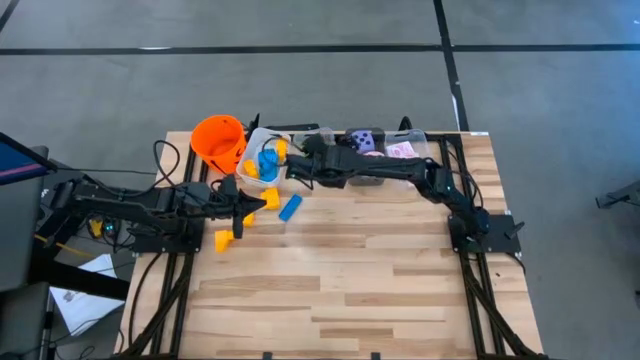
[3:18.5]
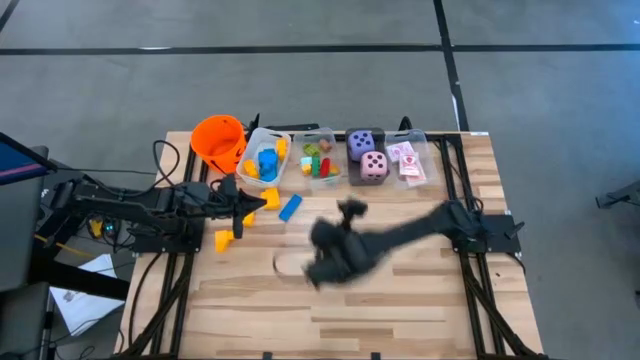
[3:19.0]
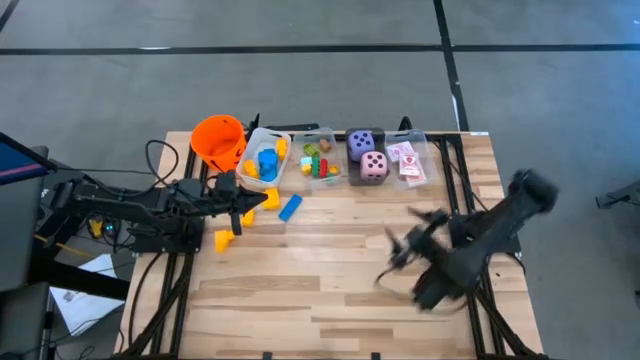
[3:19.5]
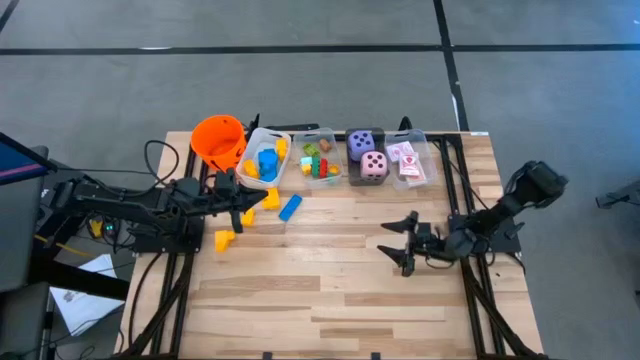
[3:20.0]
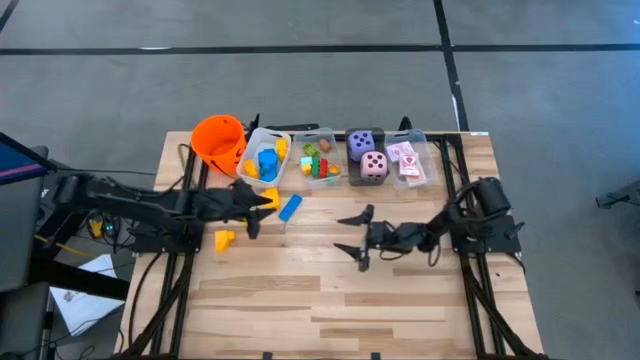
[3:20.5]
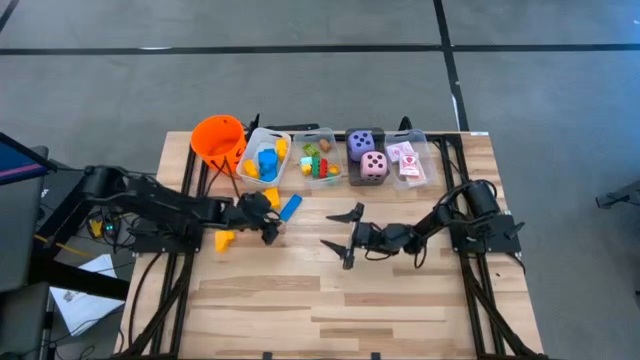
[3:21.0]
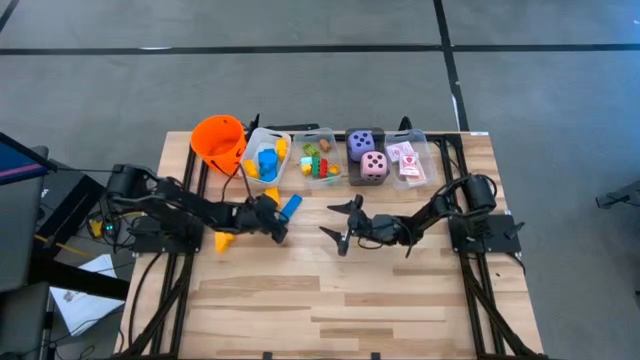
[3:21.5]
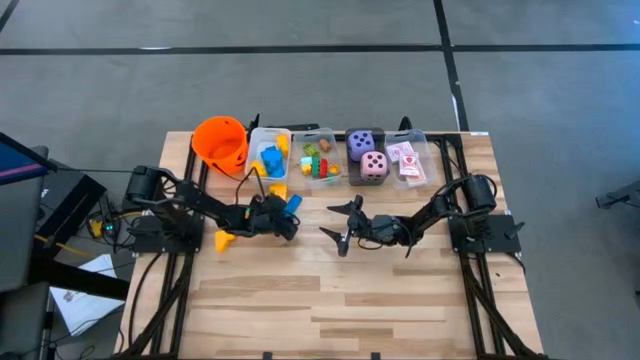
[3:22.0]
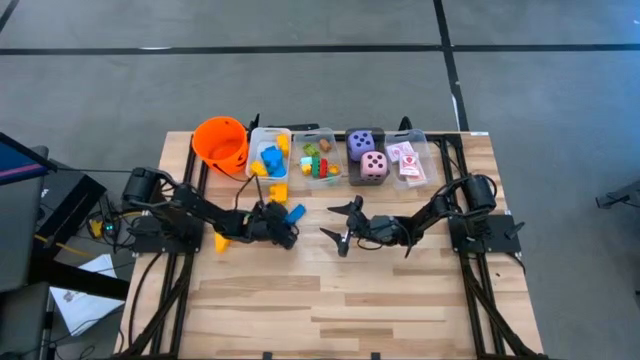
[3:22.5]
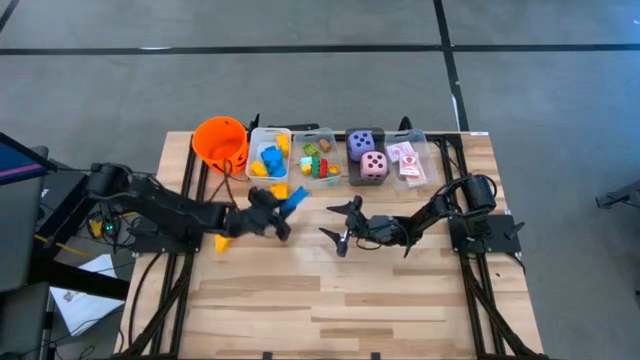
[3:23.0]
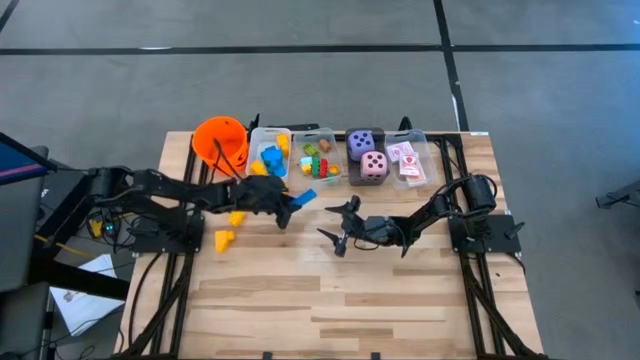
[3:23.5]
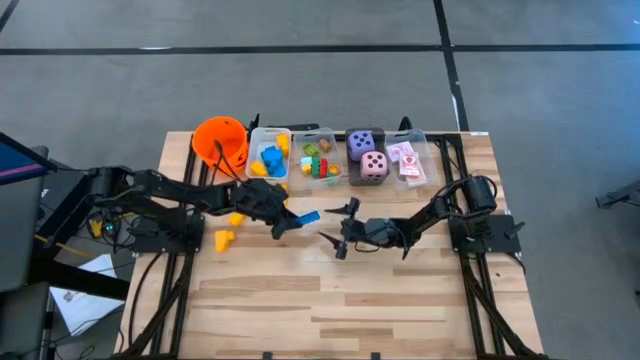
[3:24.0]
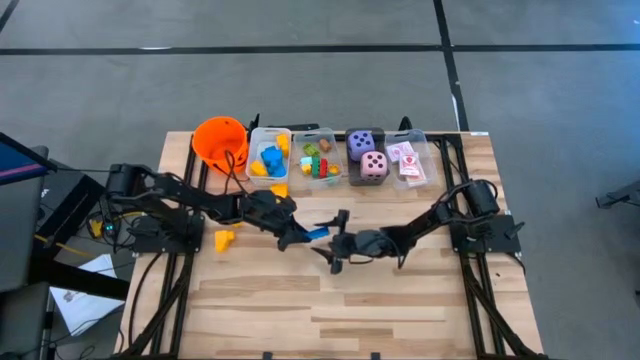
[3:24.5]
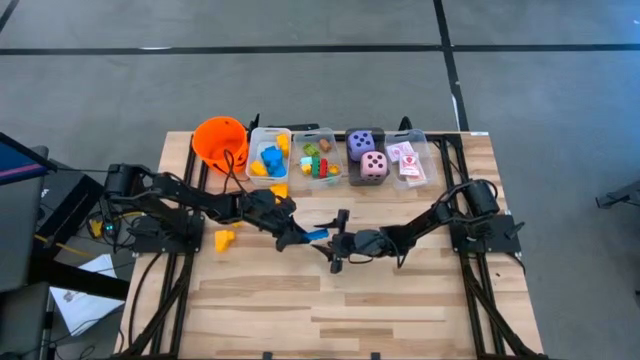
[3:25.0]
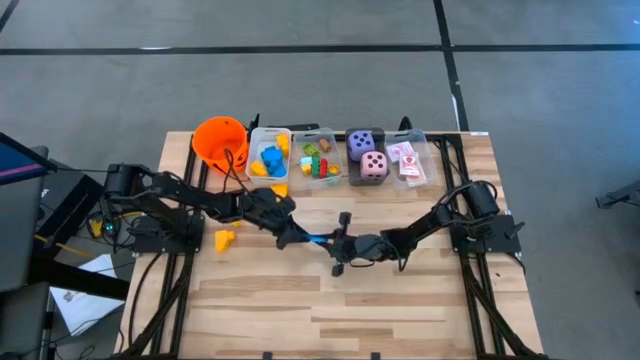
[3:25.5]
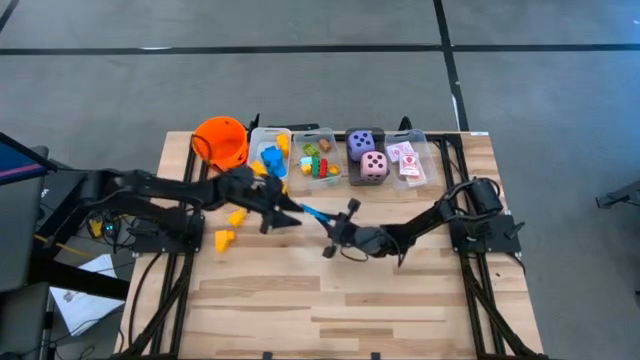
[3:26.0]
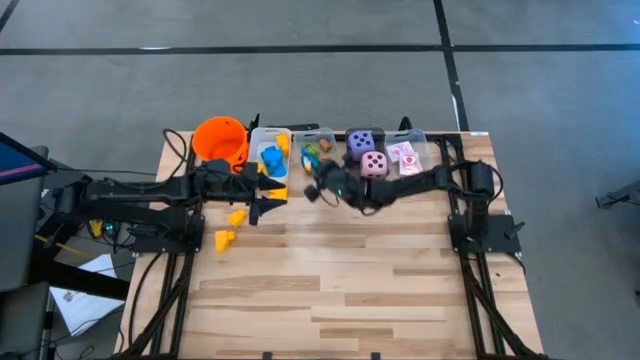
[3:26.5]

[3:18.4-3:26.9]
Task: Pick & Place Toys
Put the small blue game piece into the left transparent bin

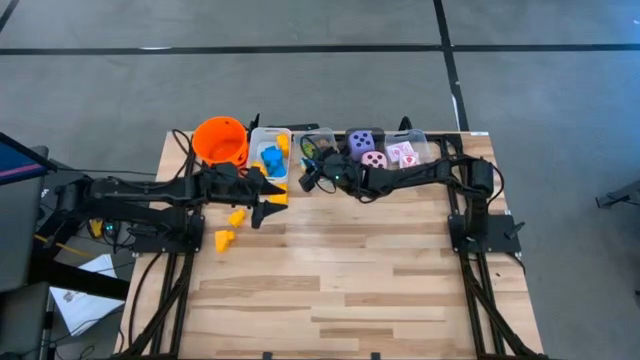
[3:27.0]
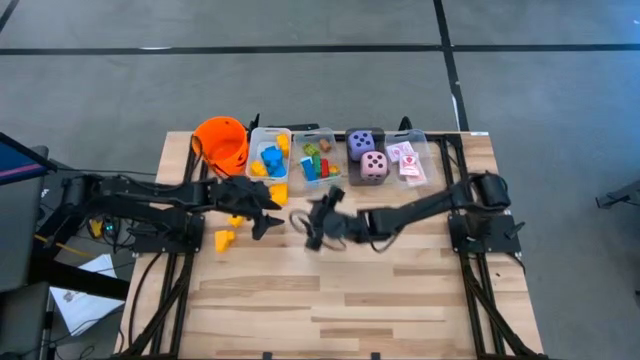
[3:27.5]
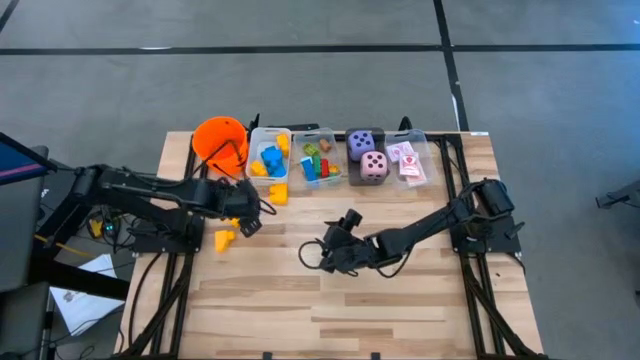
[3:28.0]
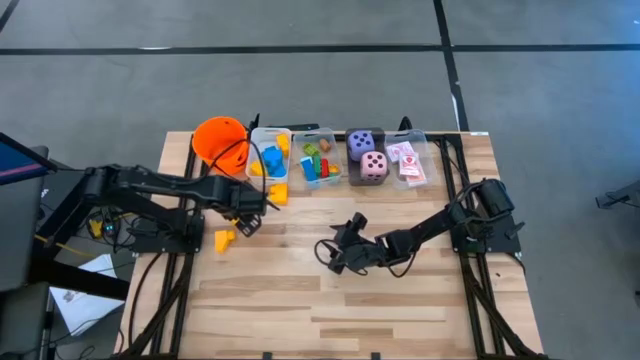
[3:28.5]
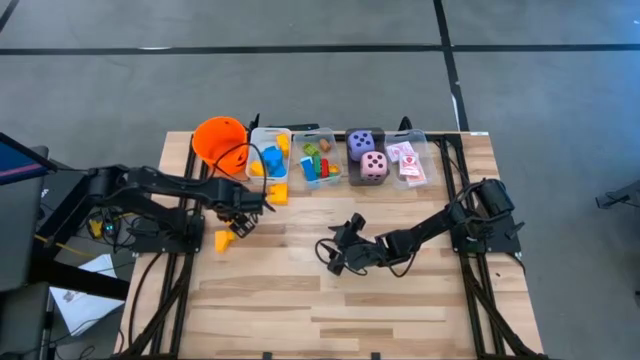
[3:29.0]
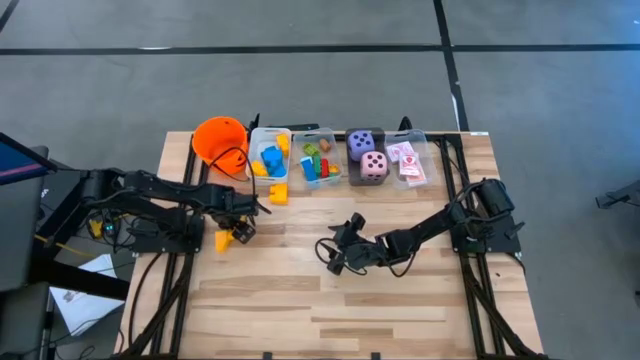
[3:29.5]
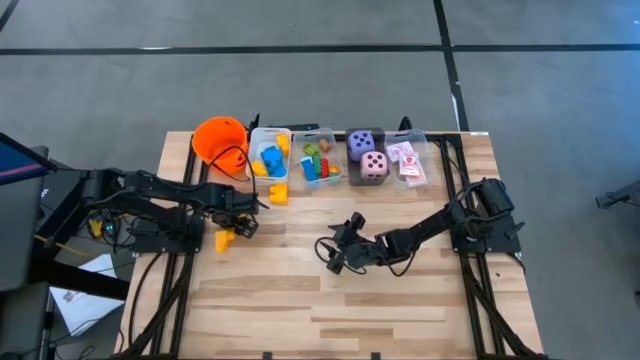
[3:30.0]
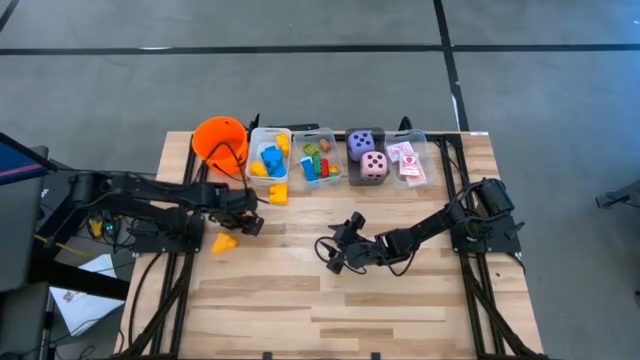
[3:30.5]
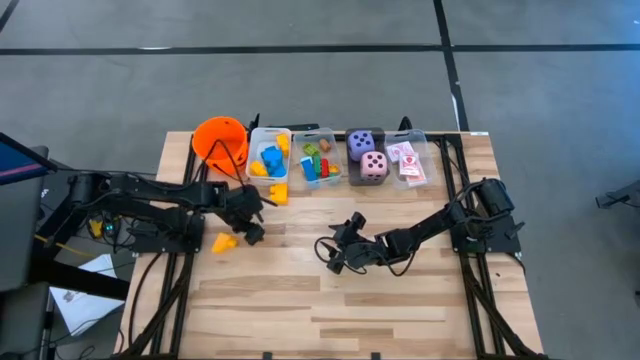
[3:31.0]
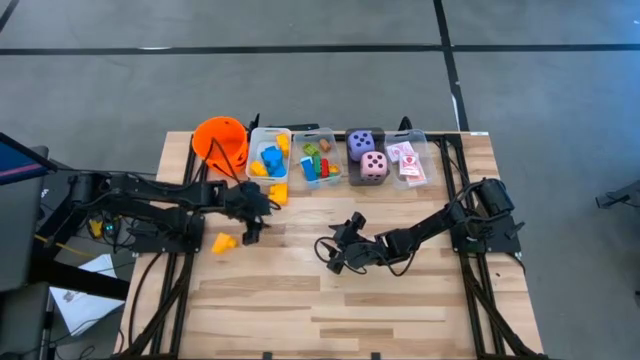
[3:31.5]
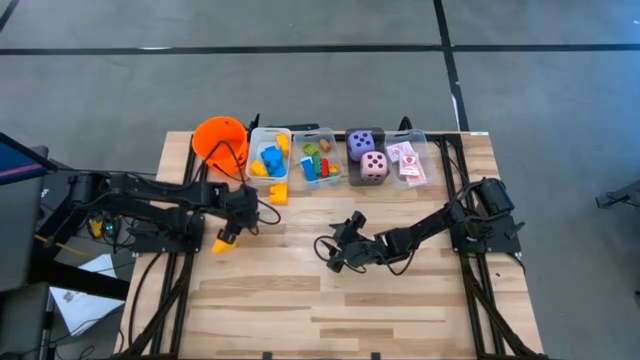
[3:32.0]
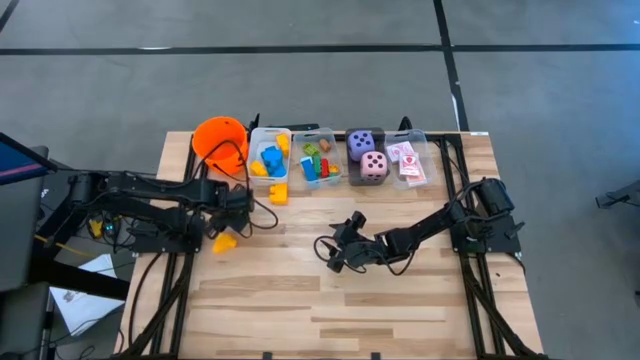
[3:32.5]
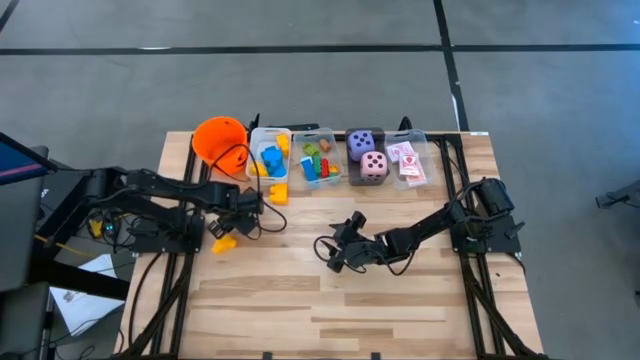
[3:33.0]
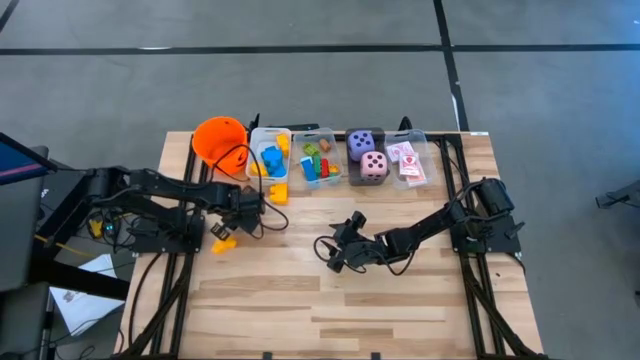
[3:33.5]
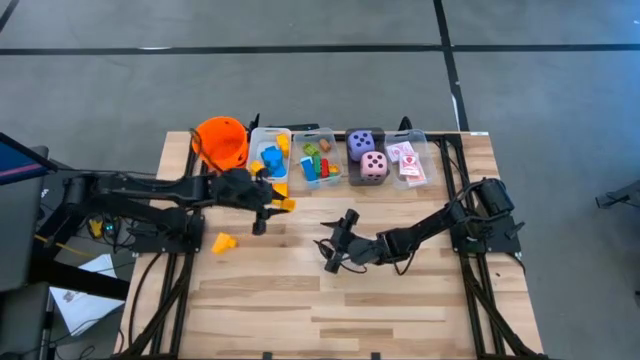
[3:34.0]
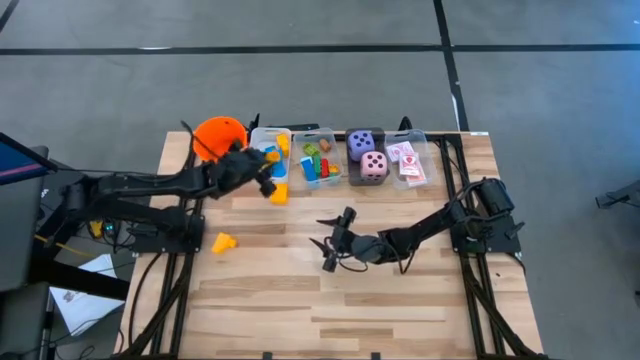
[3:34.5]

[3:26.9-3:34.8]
Put the large yellow game piece into the white bin

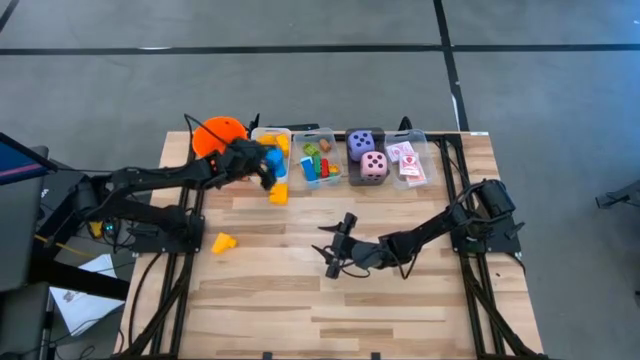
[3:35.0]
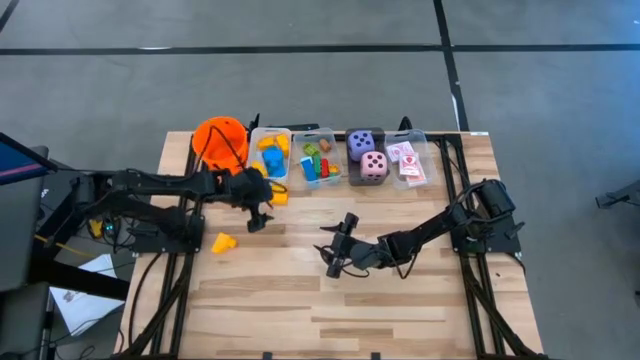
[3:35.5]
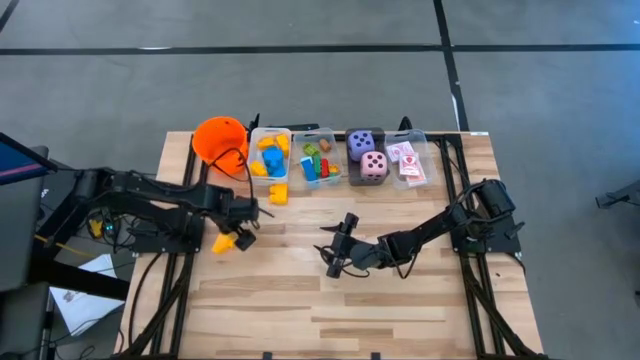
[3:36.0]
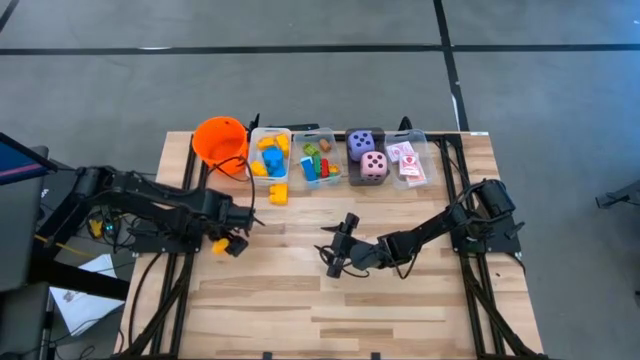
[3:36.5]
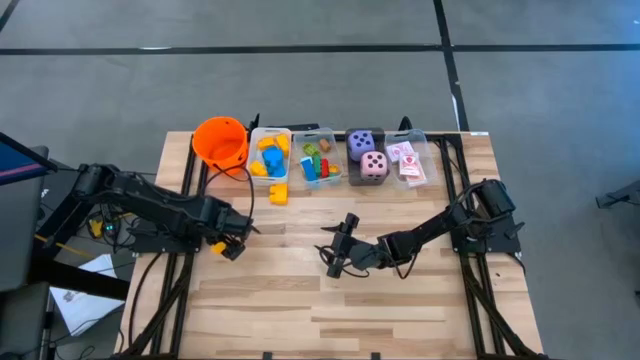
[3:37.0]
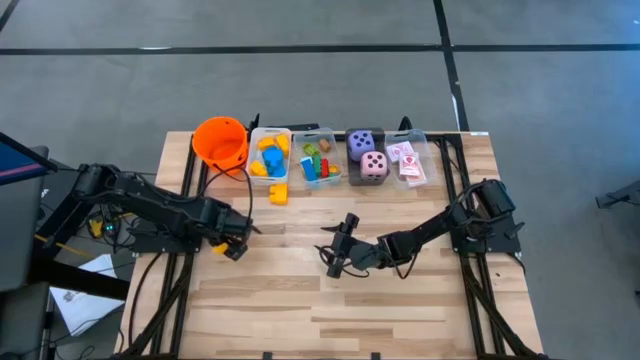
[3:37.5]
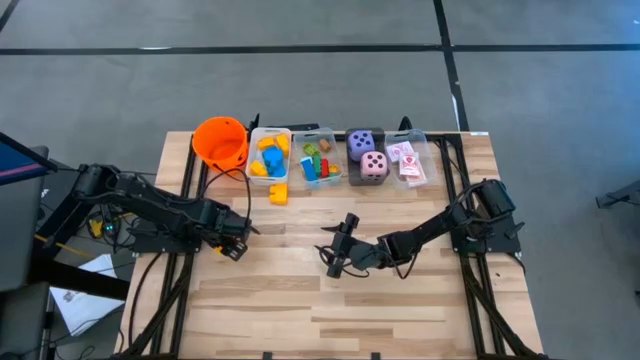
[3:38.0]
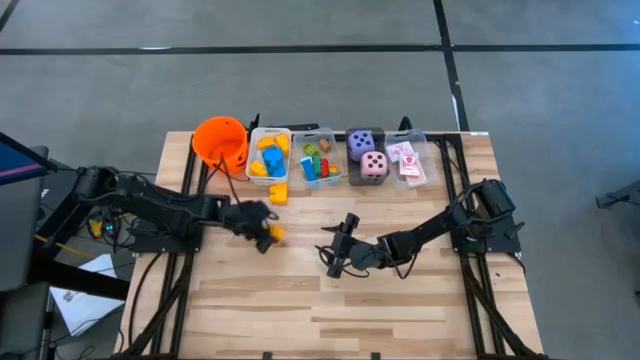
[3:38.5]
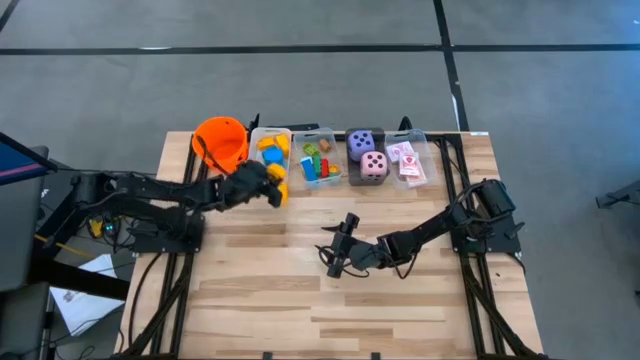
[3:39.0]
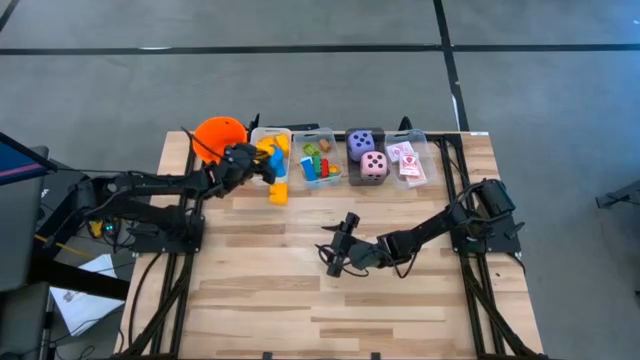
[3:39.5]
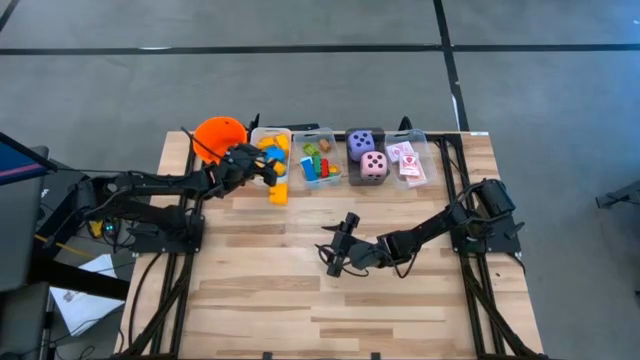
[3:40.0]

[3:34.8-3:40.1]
Put the large yellow game piece into the white bin

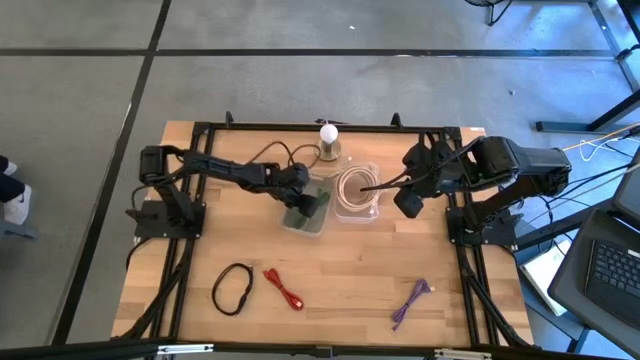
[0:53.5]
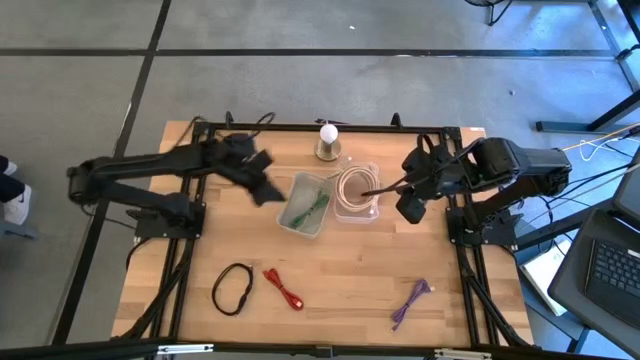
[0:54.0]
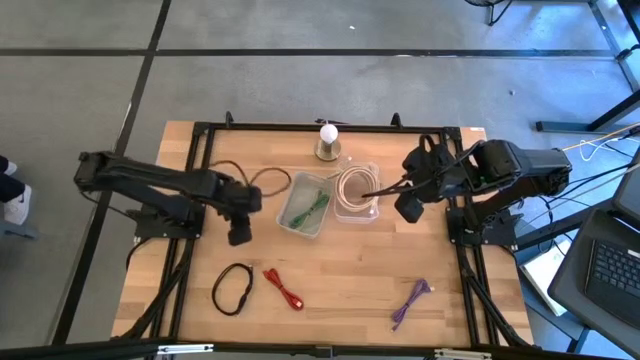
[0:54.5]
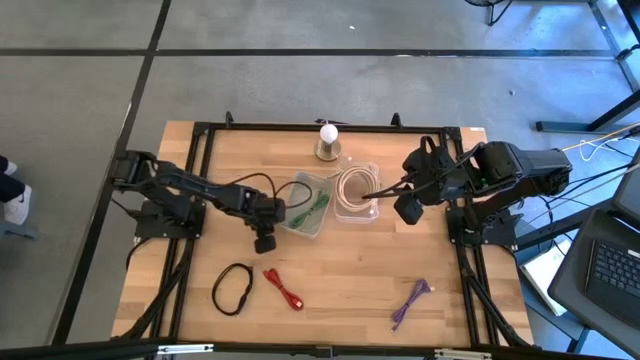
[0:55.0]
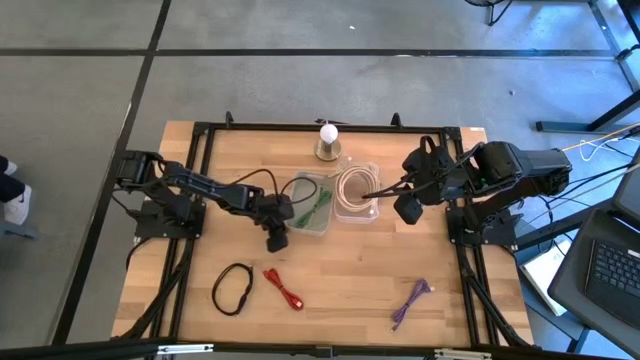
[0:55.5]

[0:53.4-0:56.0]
Task: Pick and place USB-C Cables
Adjust the gray bin
